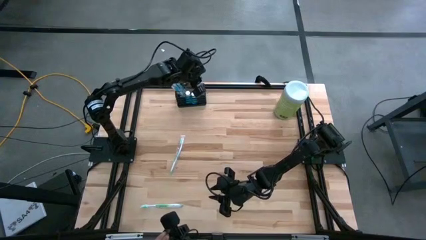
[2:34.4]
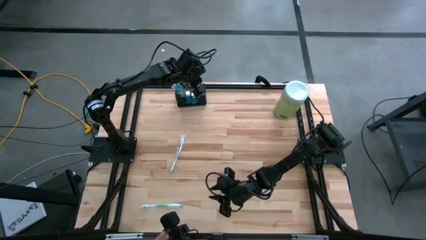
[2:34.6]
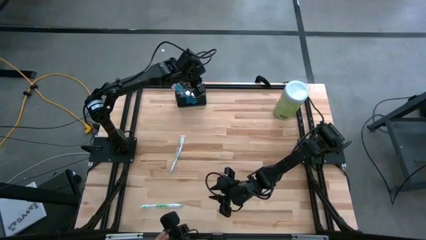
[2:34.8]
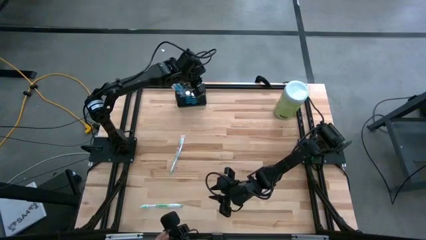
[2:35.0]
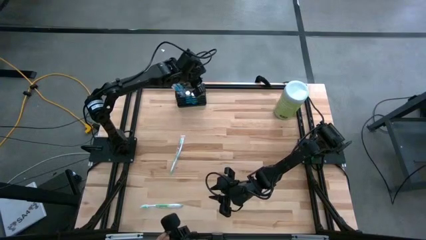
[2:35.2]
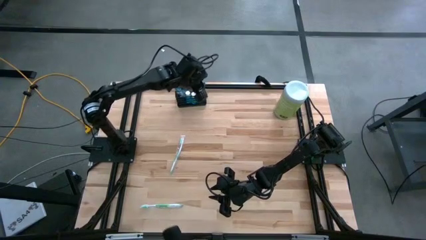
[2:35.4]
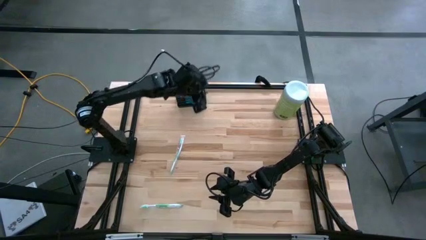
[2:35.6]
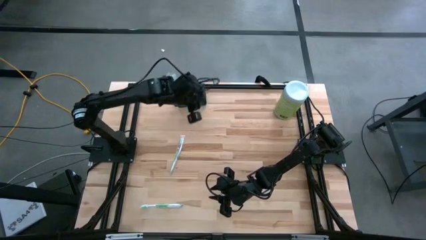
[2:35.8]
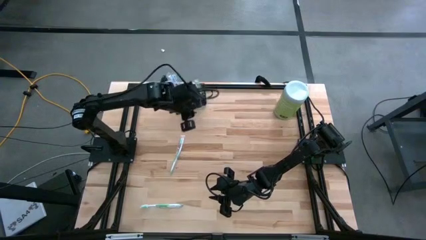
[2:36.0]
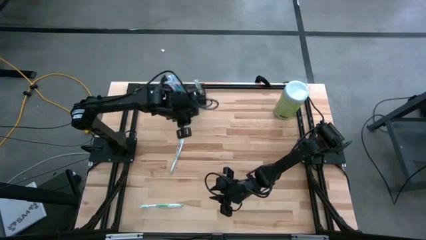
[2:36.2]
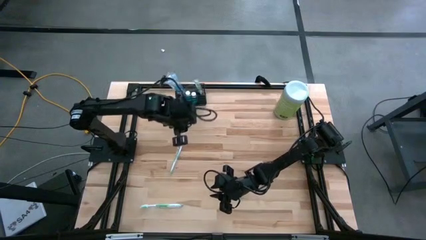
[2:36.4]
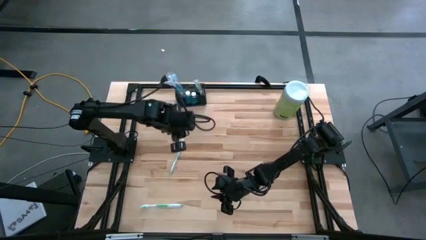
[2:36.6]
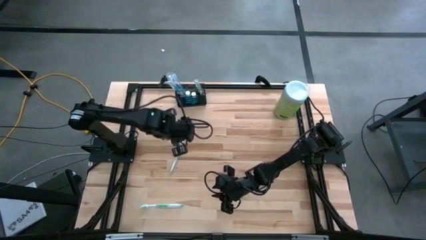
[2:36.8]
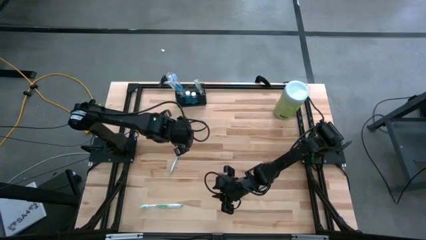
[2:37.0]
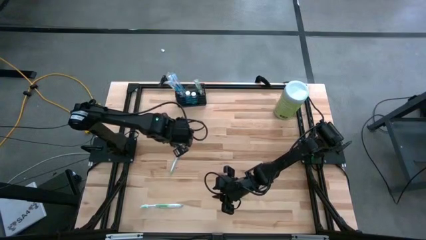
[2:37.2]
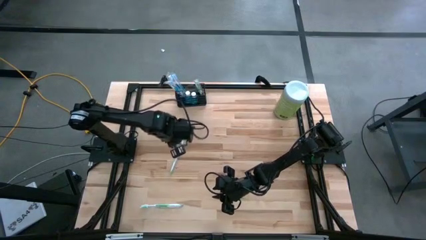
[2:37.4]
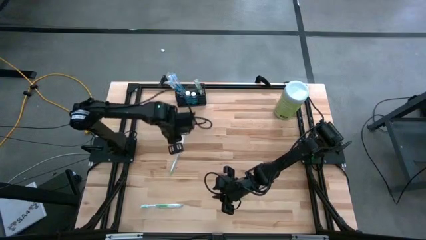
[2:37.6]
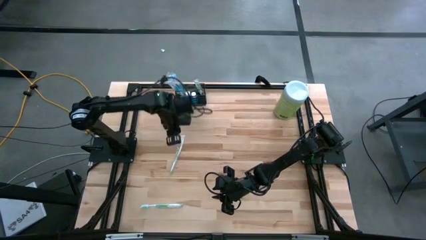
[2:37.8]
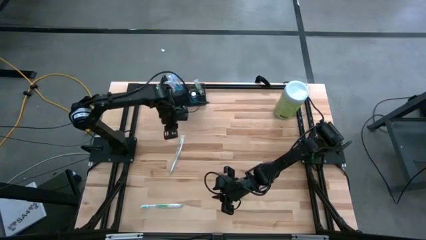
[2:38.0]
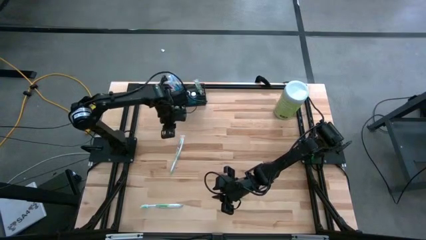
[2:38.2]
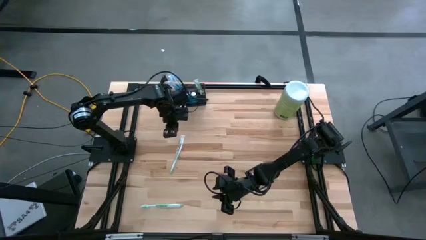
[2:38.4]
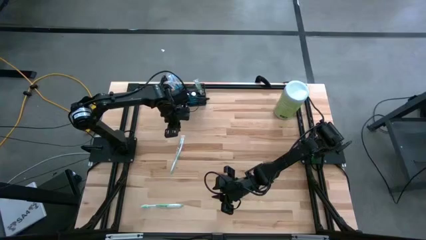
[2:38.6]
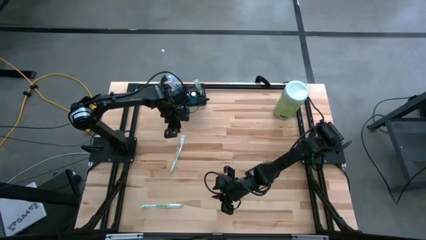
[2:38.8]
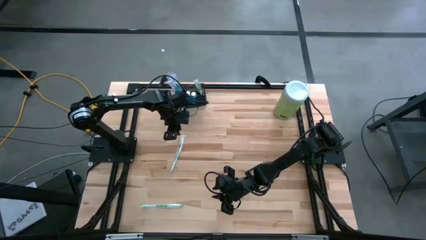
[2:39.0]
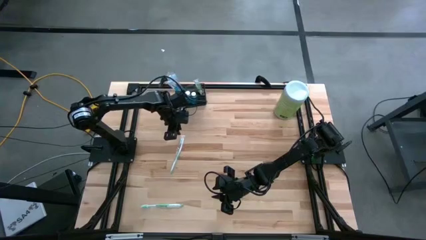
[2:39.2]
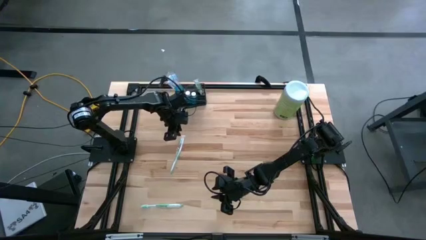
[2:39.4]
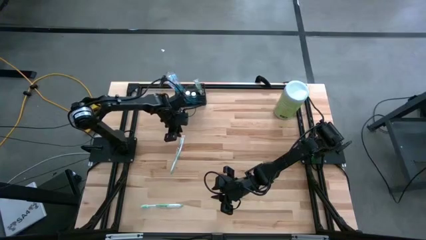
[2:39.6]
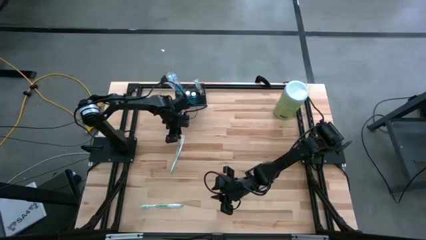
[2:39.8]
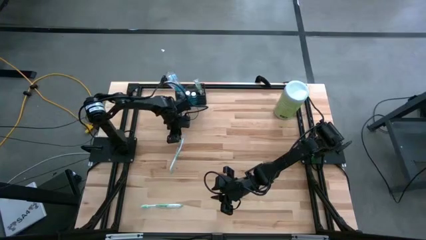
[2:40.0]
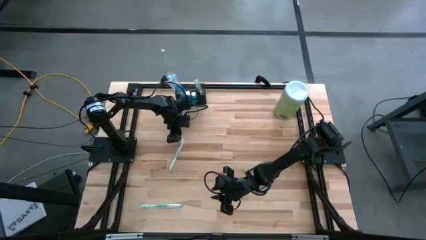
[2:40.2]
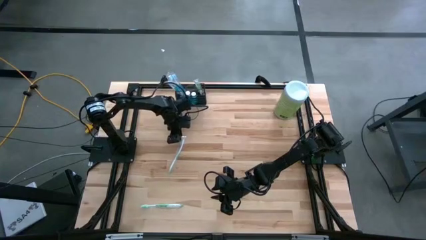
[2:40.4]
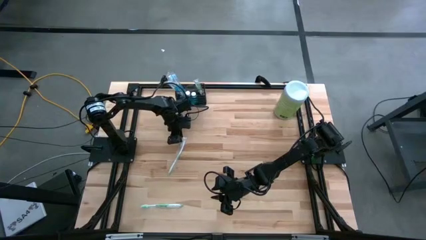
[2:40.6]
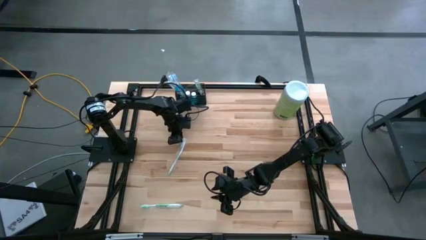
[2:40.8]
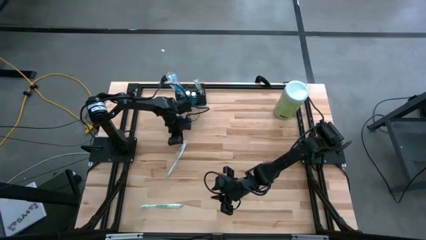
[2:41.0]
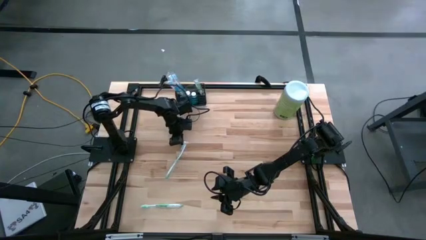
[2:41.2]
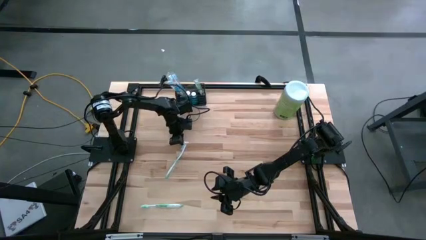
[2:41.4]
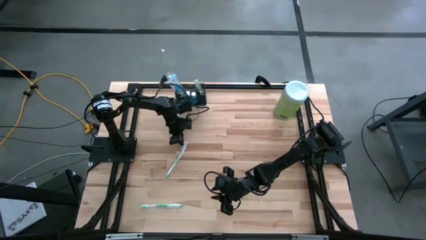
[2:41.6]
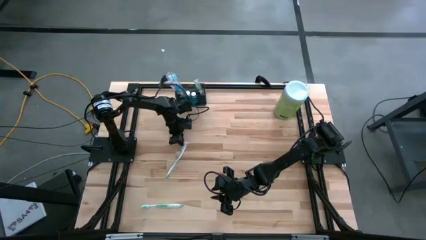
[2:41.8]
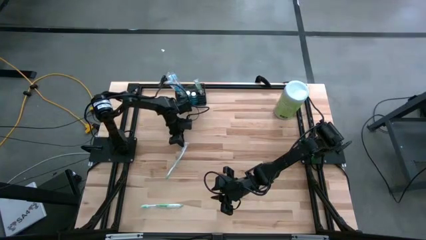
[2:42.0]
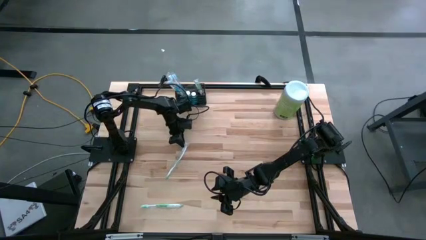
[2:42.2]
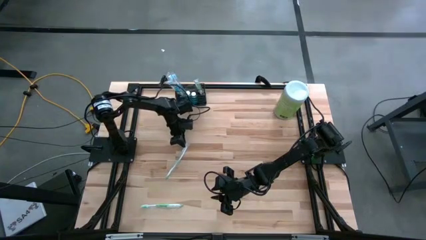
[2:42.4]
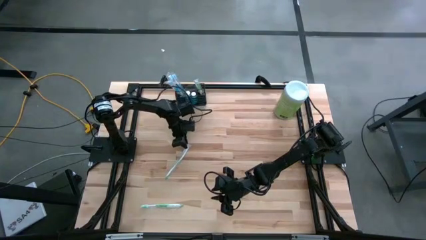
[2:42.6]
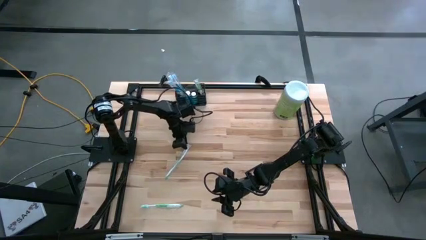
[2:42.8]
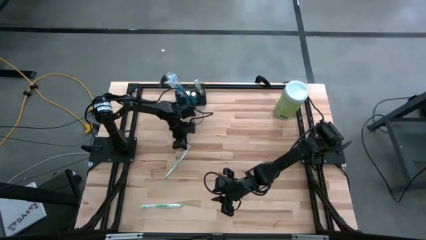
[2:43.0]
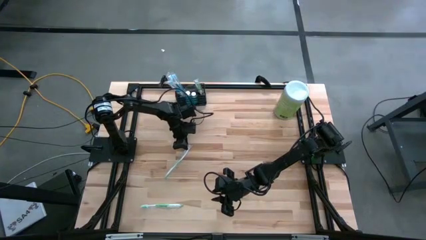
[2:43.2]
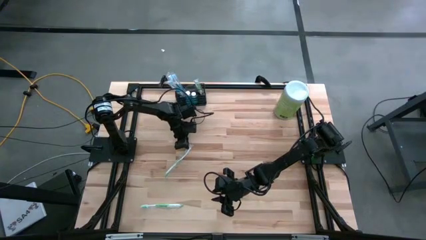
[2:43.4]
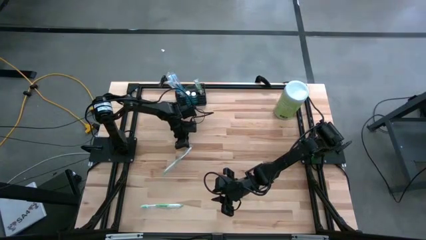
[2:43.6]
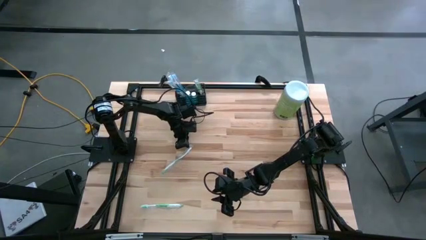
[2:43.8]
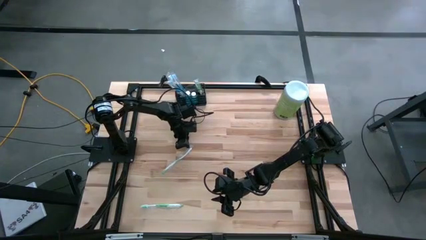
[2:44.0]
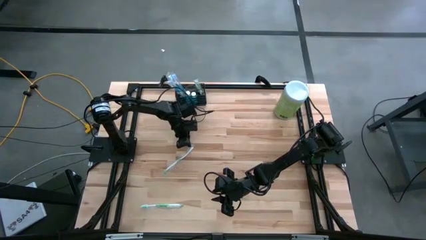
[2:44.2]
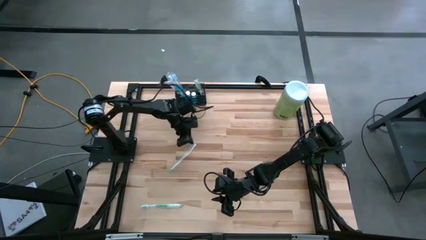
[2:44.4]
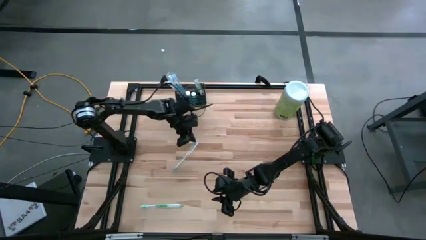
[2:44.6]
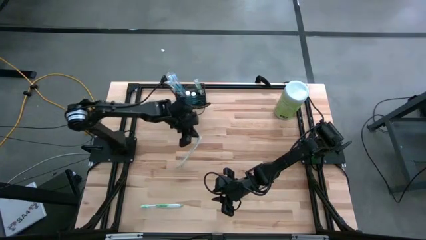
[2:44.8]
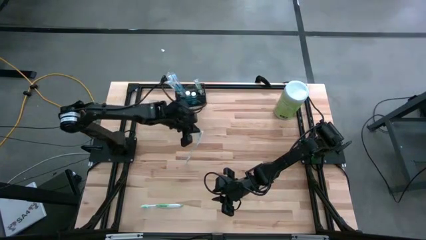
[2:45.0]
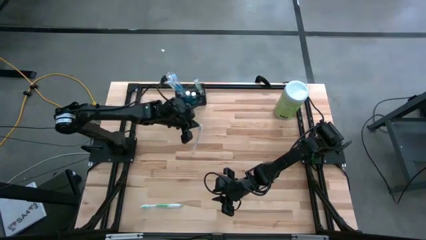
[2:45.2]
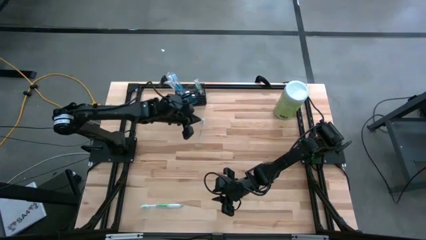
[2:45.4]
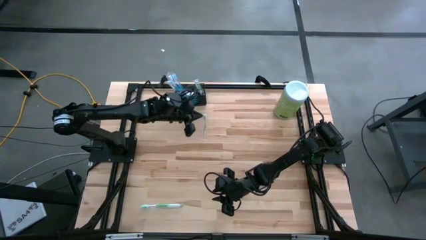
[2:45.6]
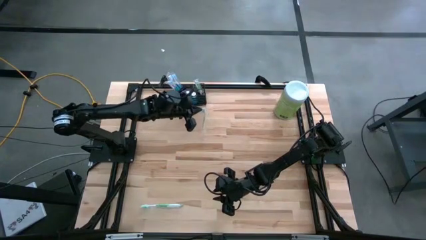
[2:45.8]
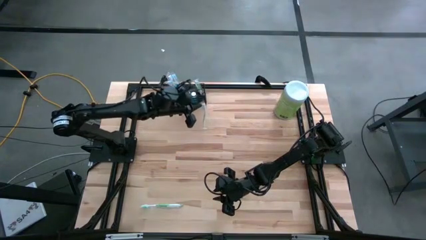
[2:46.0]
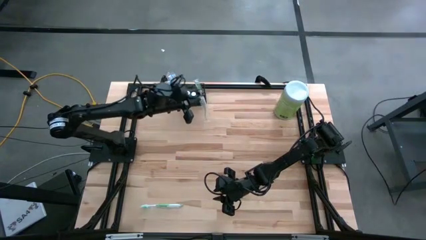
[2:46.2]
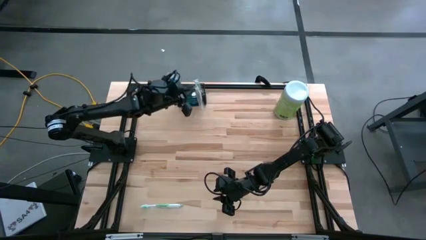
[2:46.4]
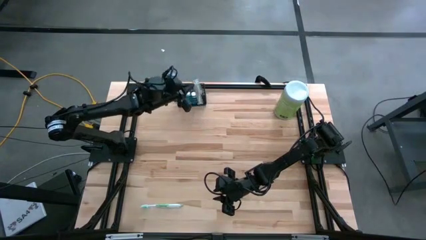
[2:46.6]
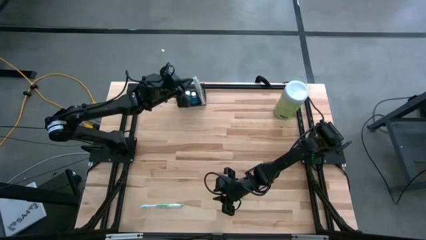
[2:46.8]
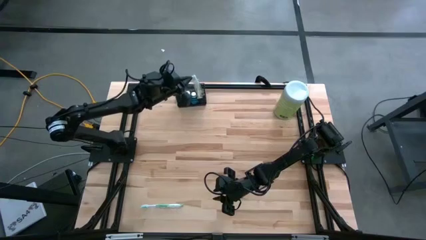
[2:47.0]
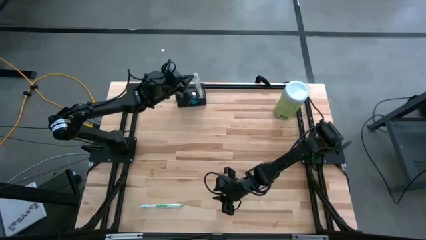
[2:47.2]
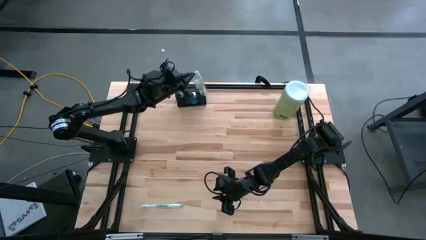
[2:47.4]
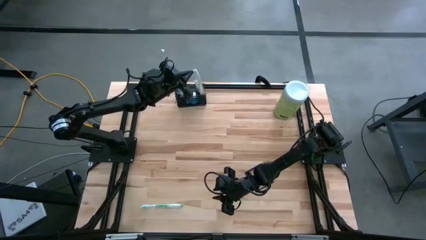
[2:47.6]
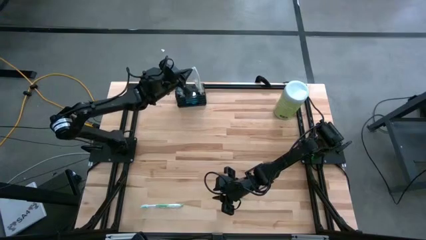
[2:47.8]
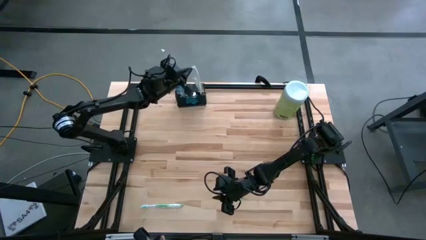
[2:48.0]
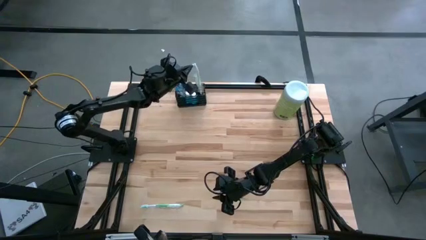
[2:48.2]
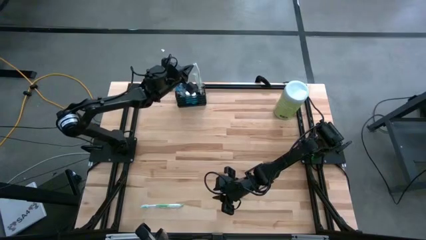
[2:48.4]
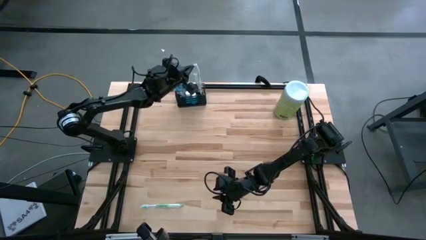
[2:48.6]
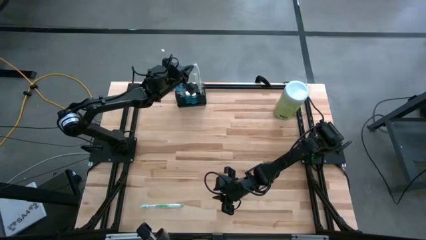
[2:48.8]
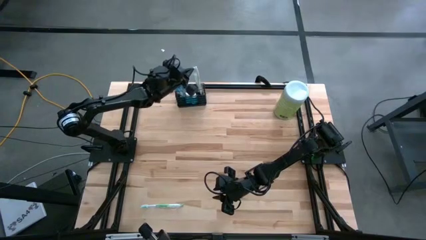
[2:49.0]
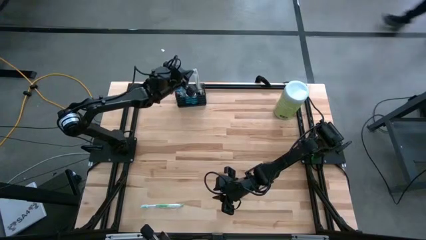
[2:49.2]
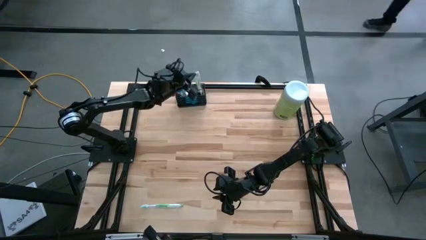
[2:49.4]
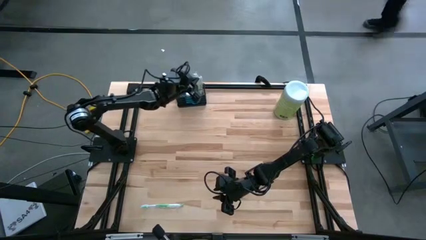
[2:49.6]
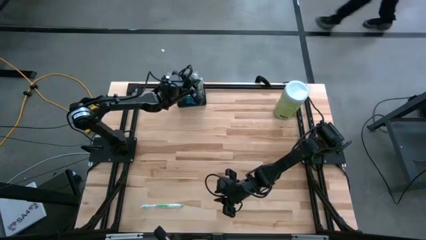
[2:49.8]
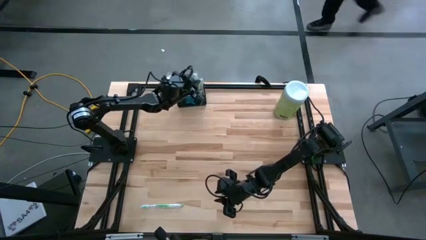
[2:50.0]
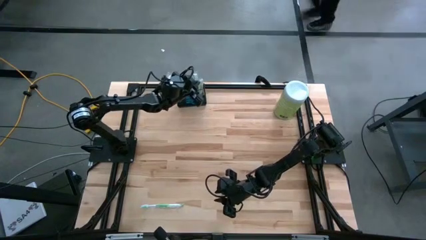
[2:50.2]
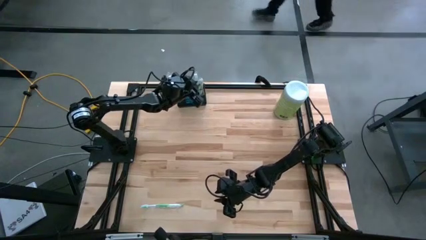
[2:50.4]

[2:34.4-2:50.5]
Task: Pick & Place toothbrushing station
Put the top green toothbrush into the wire organizer
